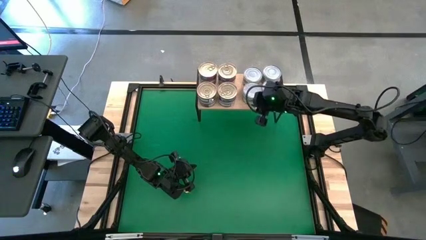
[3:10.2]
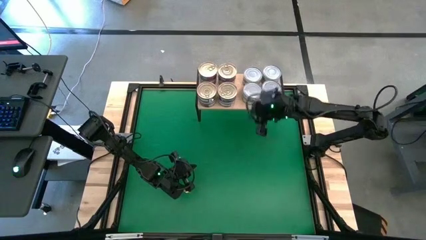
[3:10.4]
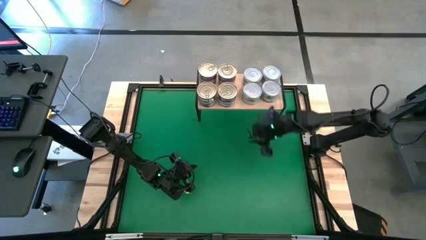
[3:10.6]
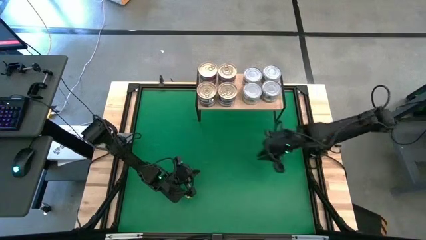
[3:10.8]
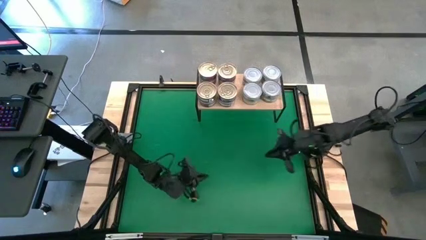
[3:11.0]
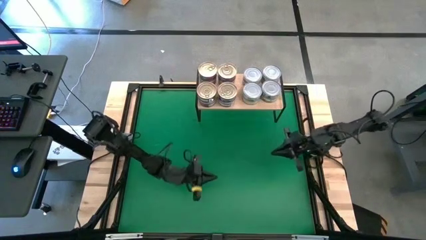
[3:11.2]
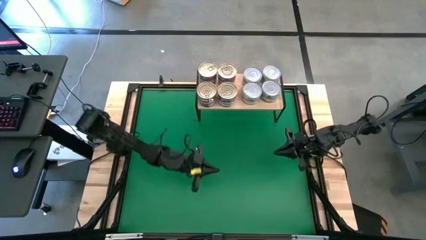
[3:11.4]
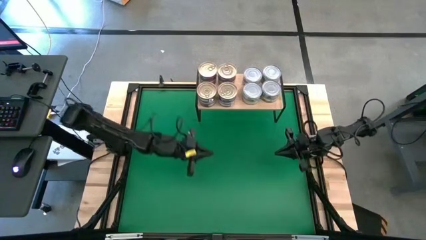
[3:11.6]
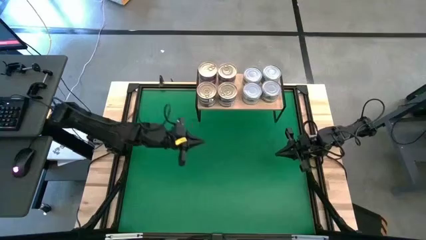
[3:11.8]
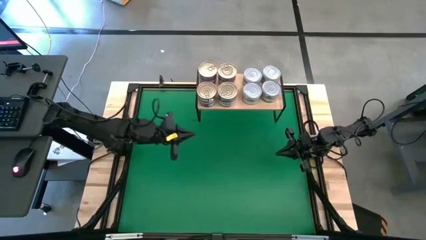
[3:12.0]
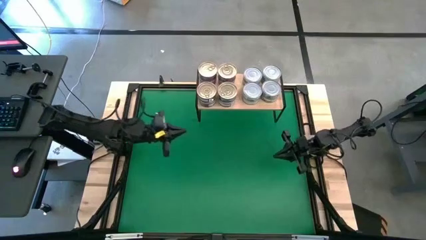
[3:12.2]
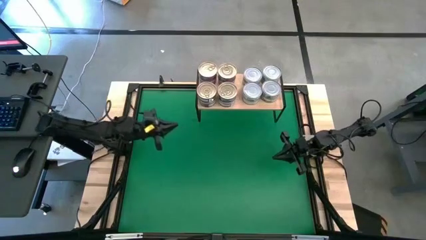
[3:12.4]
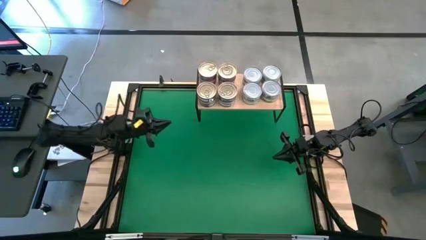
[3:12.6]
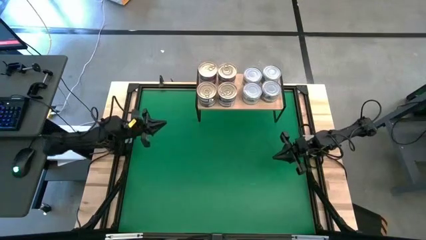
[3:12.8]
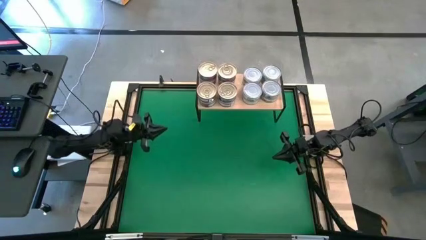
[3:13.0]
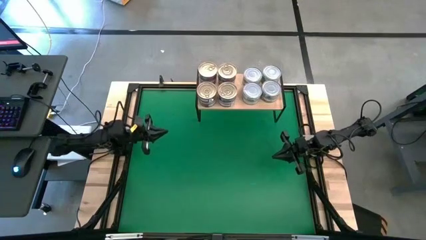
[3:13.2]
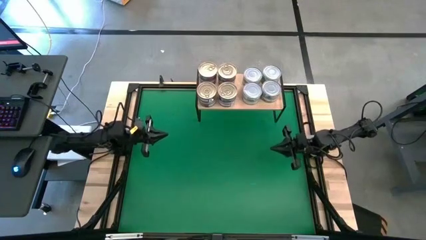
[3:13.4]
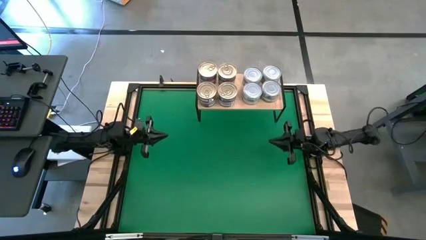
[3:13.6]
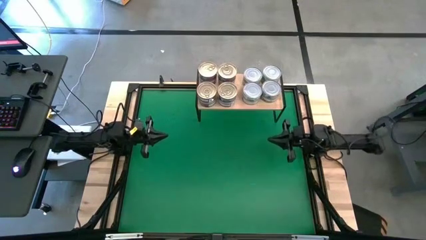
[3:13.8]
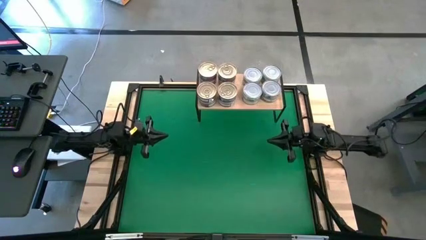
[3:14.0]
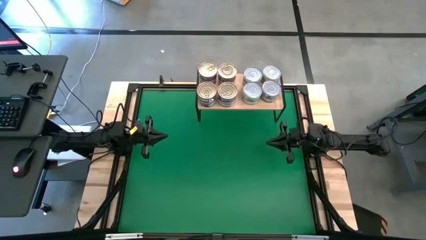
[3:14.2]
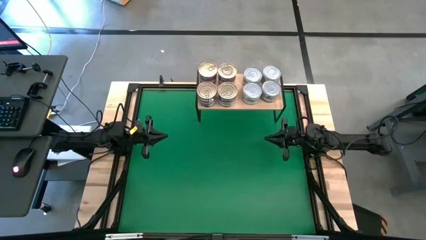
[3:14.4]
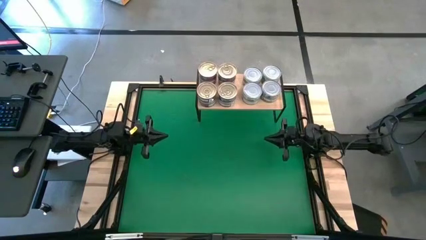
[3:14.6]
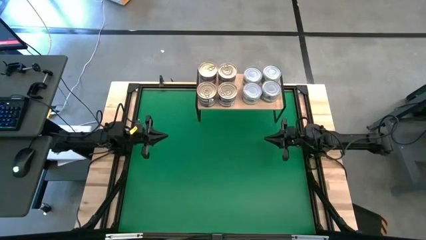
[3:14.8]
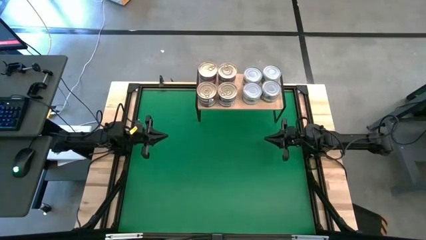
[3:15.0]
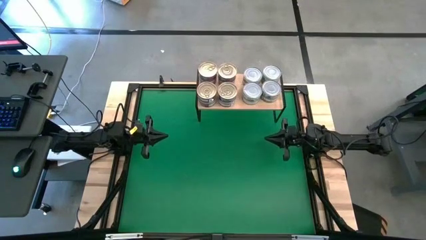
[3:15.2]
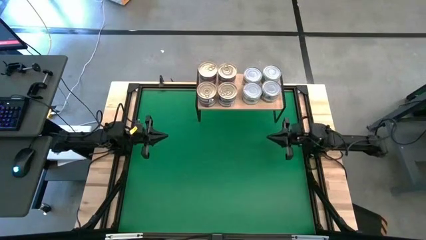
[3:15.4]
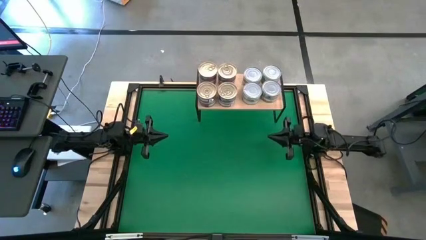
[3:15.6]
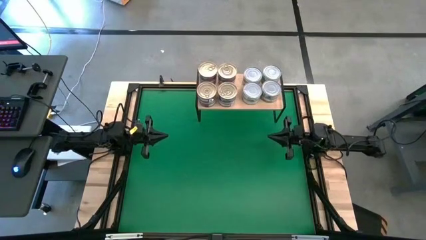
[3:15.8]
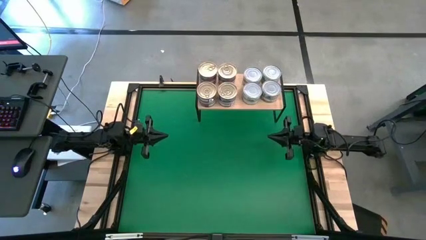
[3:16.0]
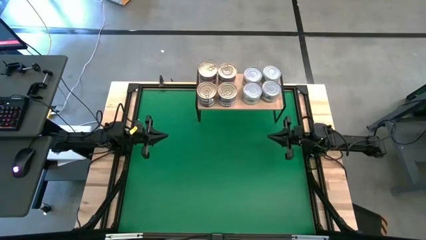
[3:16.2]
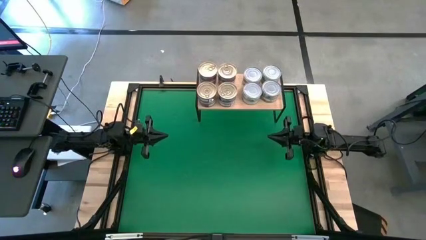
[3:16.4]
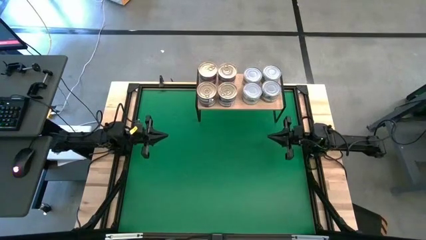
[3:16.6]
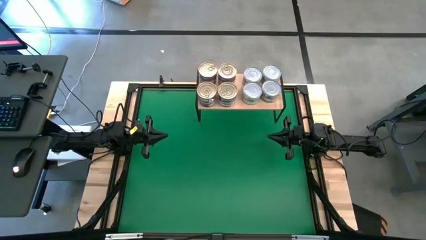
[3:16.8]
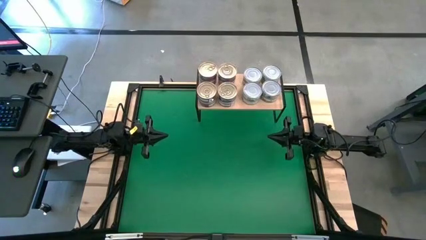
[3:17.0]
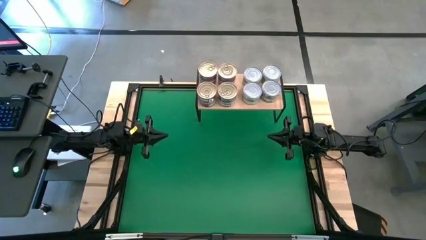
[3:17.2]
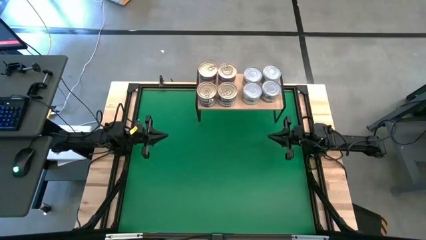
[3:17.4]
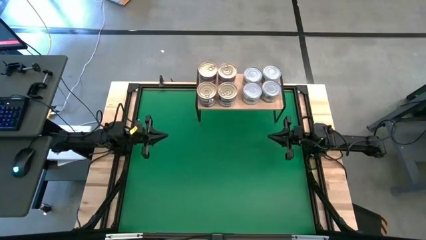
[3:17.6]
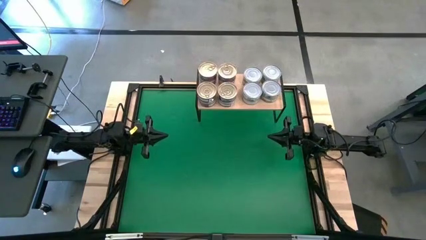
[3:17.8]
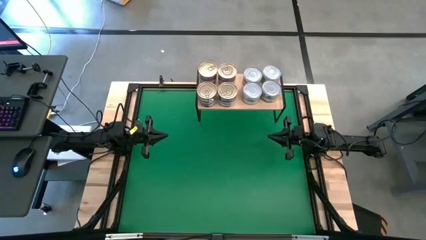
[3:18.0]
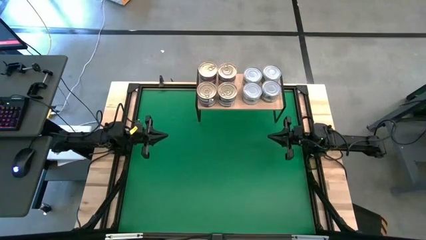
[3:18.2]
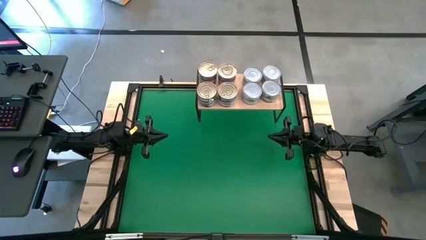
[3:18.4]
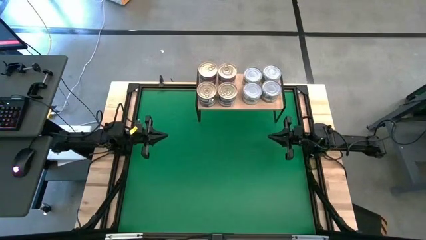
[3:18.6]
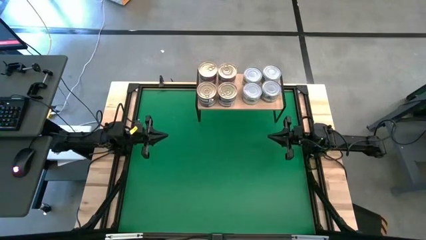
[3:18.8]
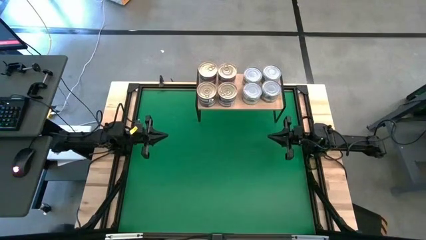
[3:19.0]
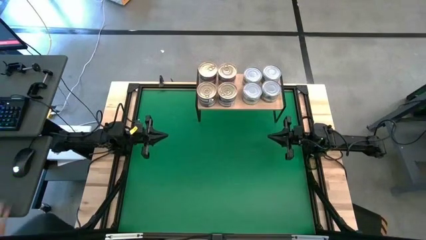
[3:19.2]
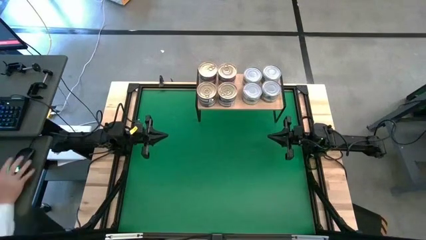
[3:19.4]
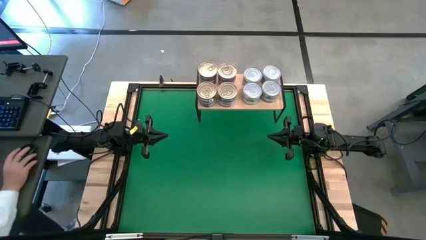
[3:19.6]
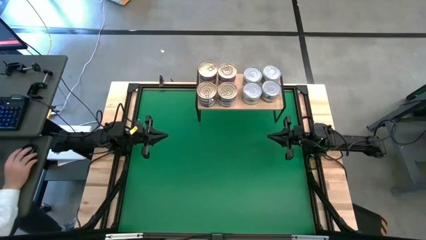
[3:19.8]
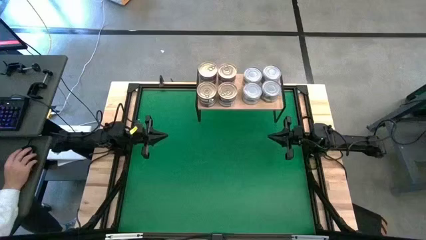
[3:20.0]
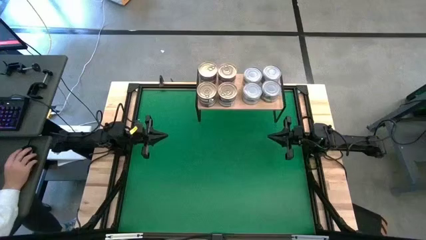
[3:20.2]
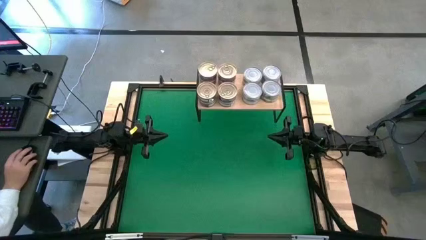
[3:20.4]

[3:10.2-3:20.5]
Task: Stack canned seafood by type on shelf
Return to Home Position

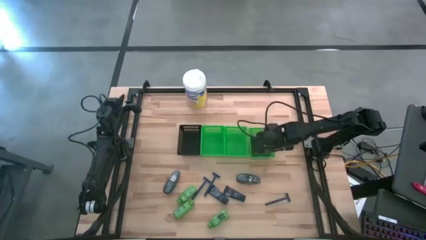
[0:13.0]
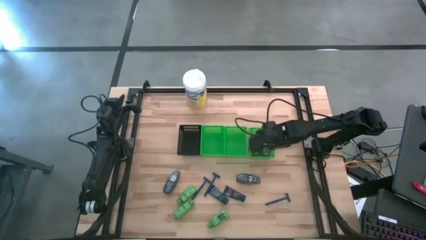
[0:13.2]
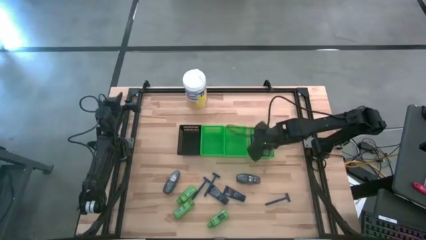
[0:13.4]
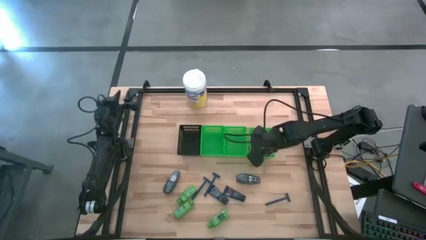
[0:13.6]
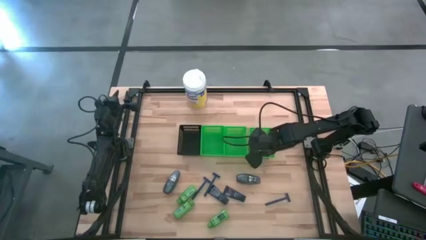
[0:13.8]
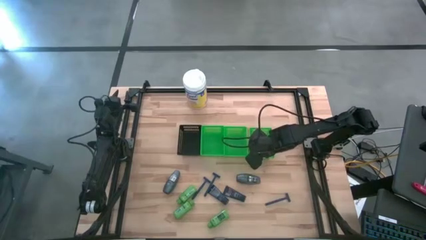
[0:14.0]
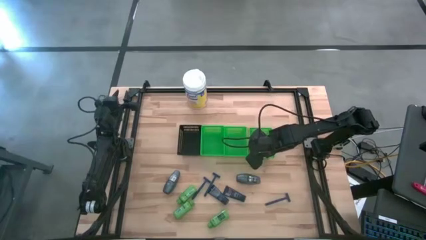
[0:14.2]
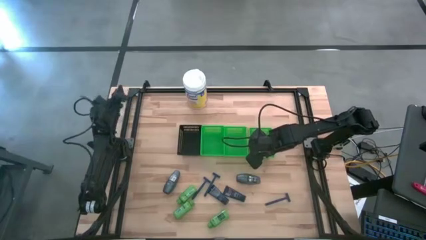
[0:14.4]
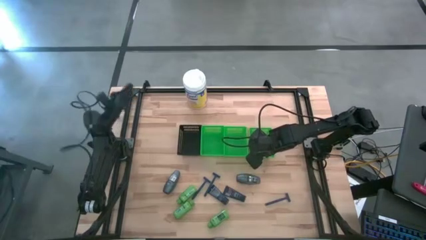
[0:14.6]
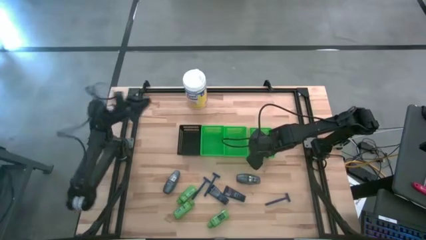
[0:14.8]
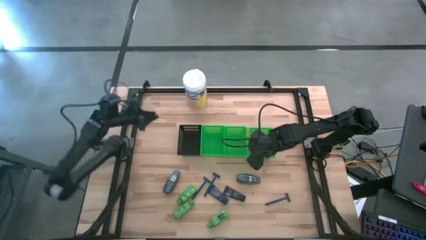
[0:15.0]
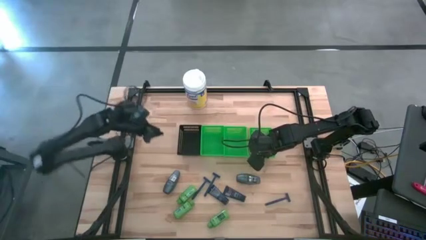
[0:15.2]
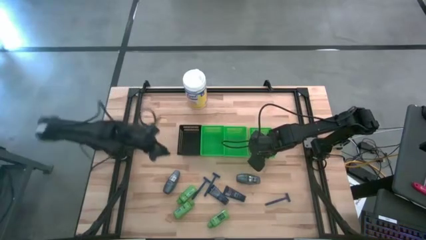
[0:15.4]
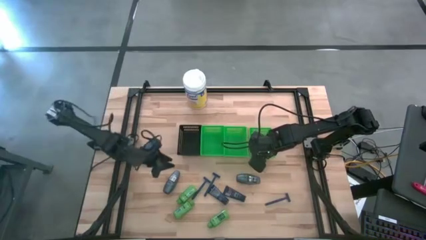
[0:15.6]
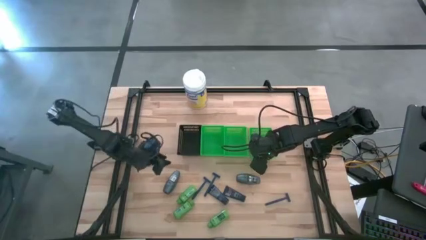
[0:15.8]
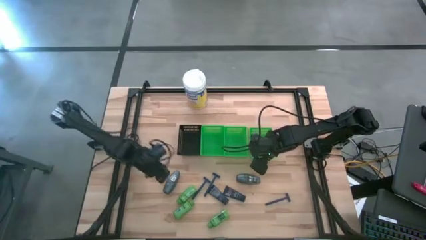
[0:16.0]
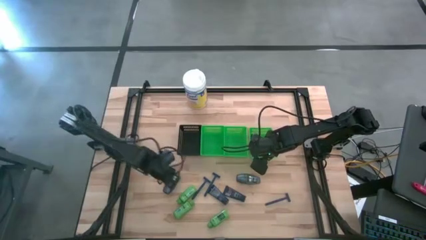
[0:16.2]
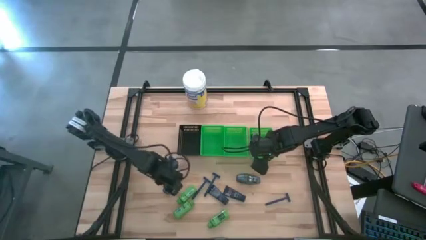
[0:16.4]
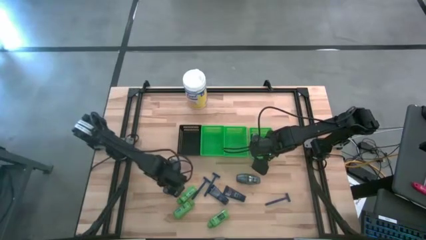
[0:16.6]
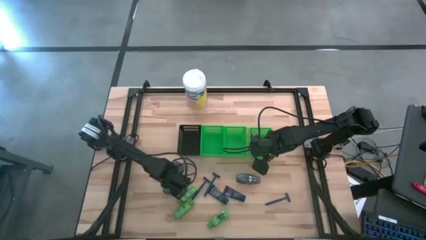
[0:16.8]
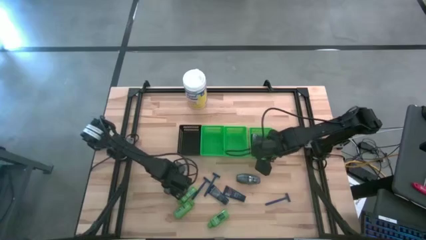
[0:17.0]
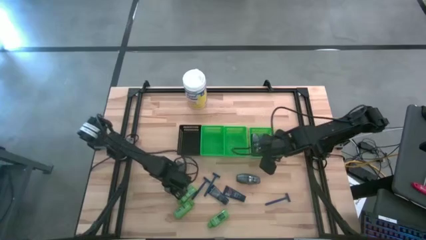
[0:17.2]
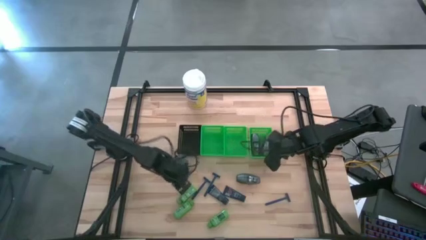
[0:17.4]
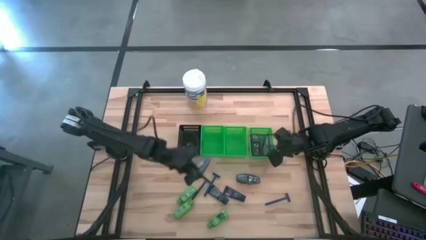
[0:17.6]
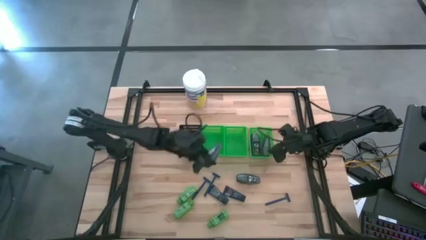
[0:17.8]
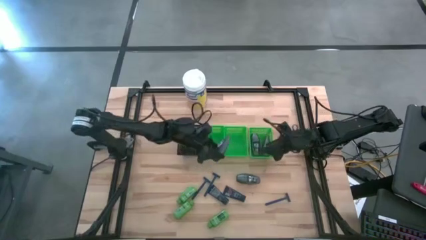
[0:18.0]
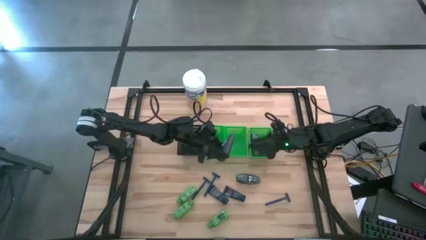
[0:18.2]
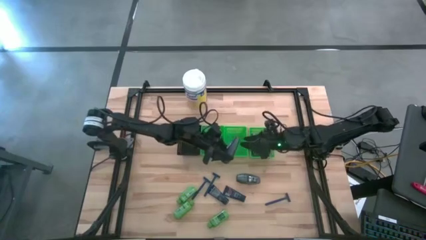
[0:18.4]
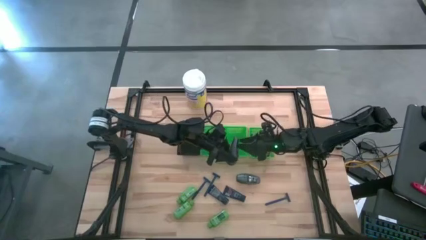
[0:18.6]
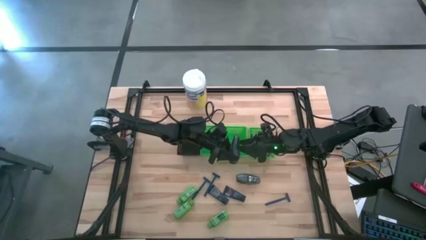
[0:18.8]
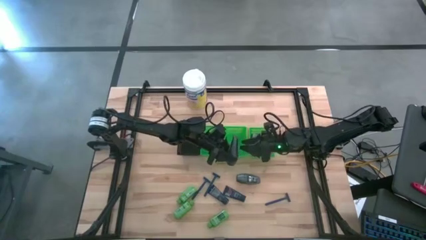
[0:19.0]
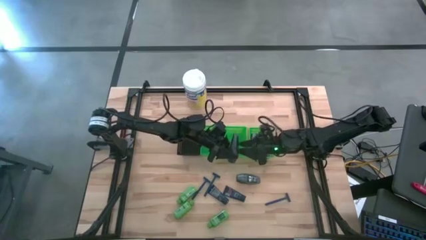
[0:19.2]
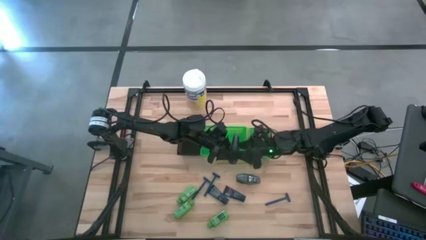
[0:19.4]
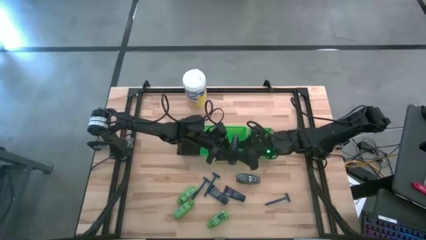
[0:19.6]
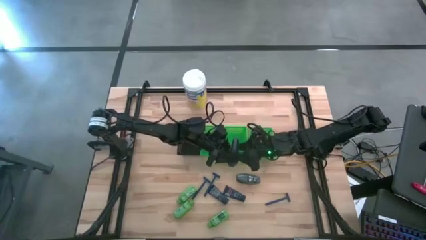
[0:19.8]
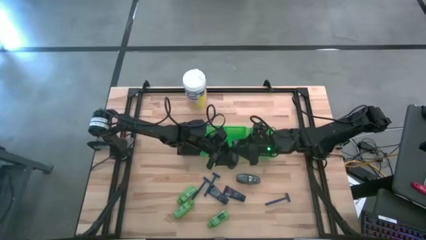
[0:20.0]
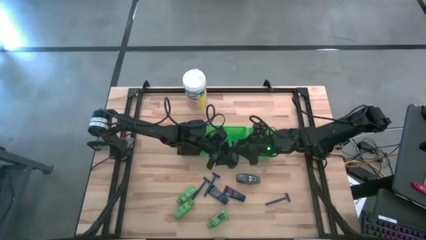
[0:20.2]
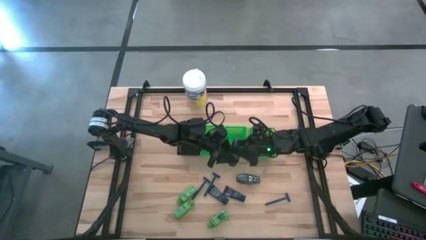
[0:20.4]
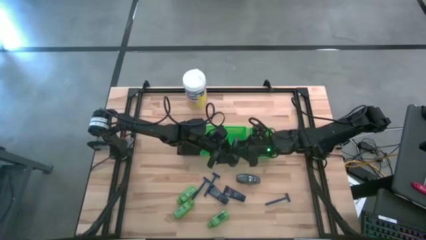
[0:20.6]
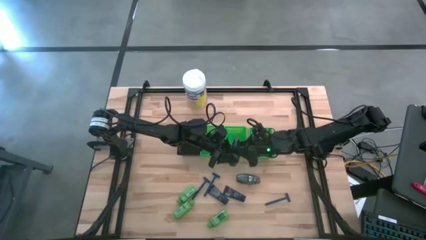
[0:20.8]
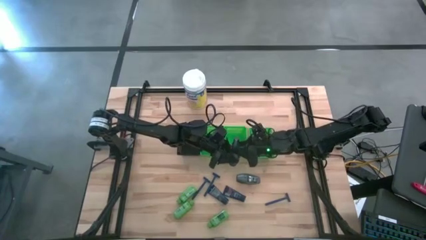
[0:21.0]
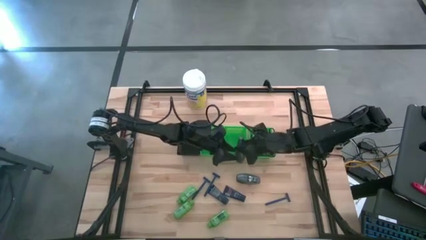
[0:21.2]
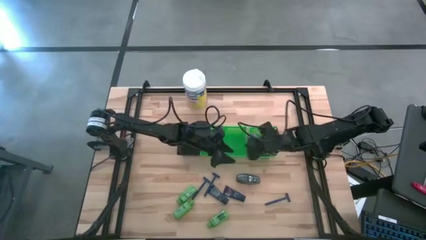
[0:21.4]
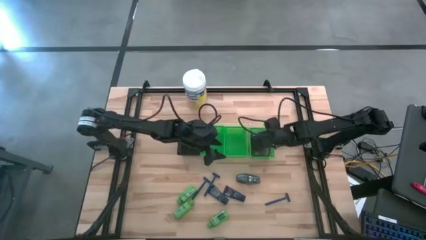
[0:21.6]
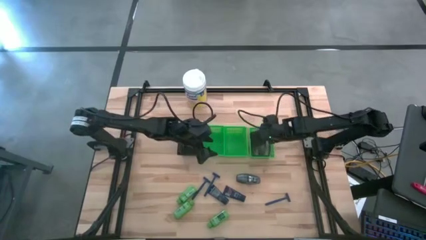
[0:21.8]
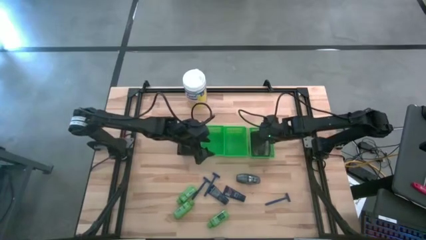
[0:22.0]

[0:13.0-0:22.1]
Task: Pick & Place Travel size toiletries
Put the deodorant into the right green bin
